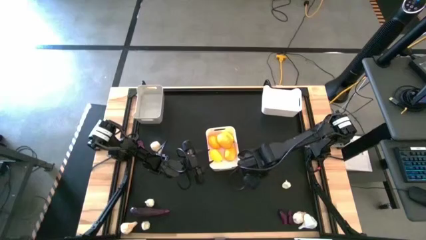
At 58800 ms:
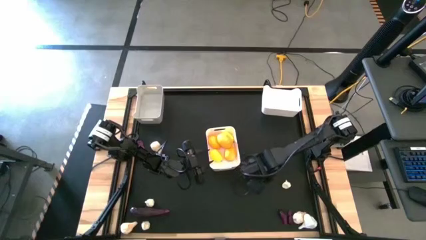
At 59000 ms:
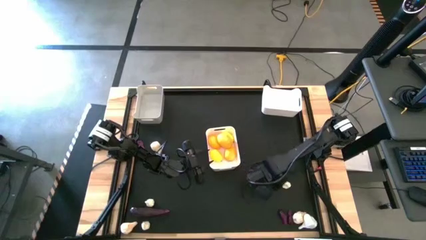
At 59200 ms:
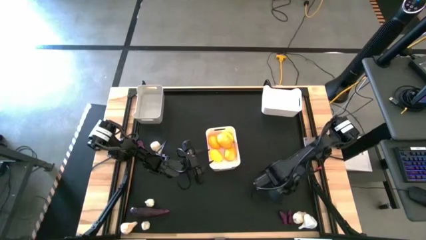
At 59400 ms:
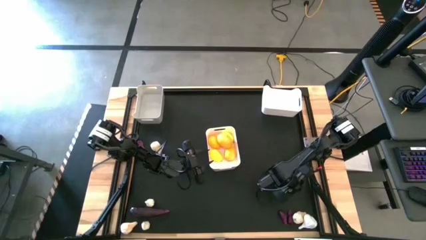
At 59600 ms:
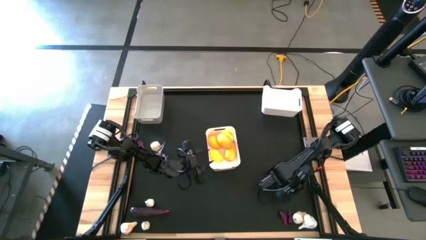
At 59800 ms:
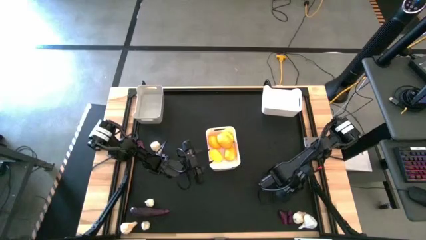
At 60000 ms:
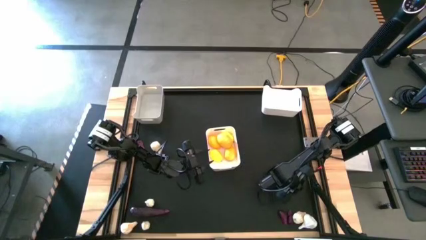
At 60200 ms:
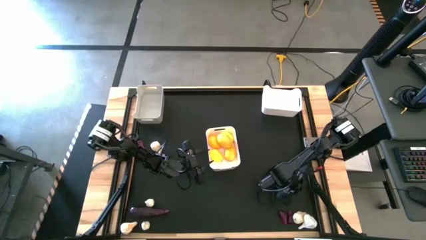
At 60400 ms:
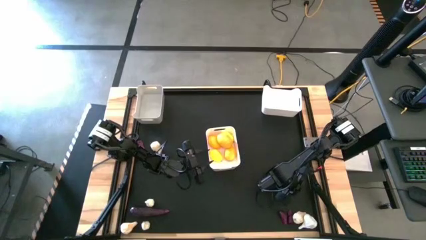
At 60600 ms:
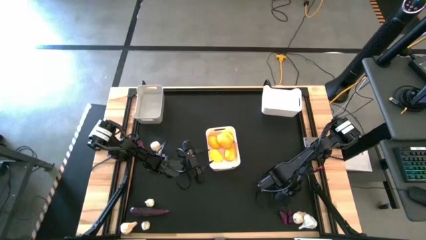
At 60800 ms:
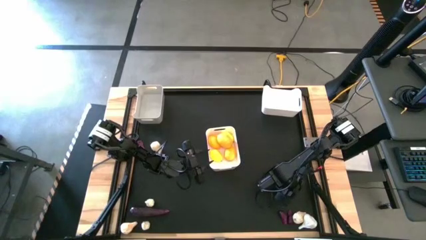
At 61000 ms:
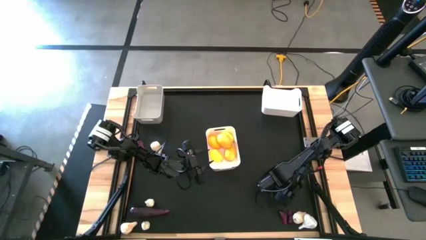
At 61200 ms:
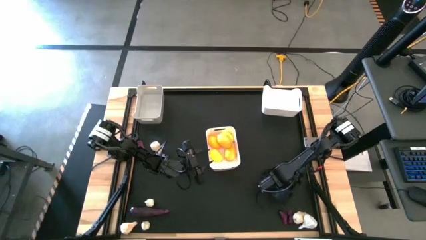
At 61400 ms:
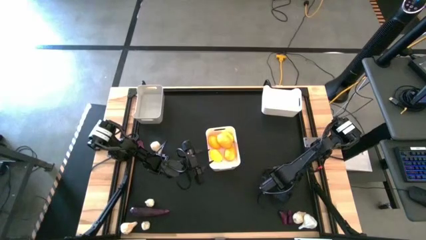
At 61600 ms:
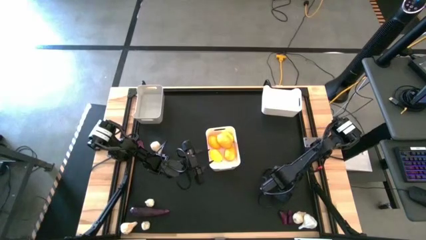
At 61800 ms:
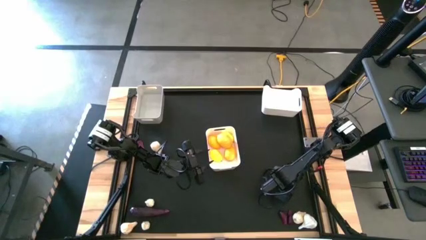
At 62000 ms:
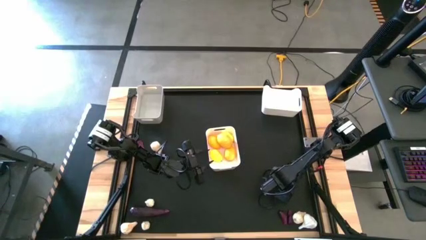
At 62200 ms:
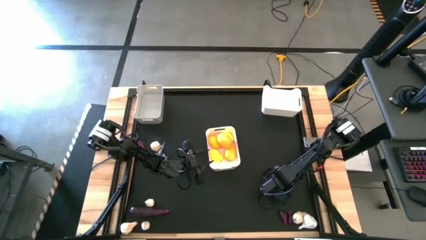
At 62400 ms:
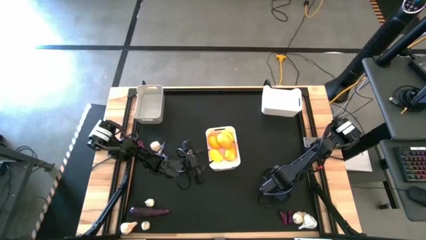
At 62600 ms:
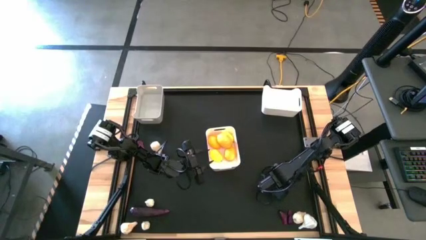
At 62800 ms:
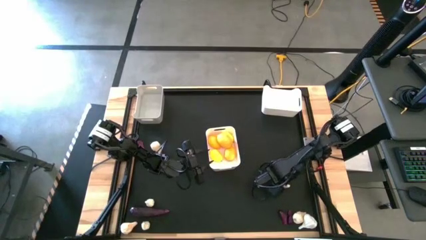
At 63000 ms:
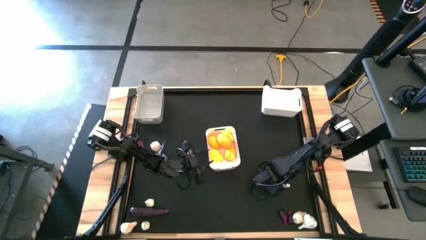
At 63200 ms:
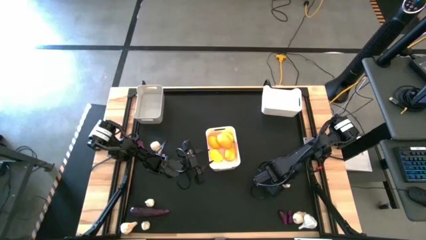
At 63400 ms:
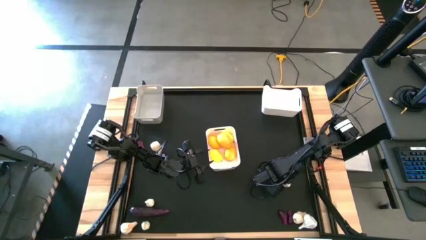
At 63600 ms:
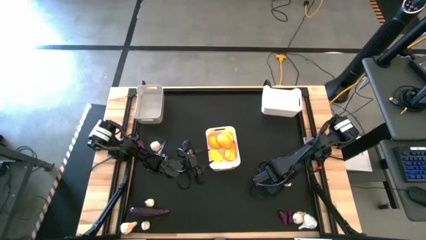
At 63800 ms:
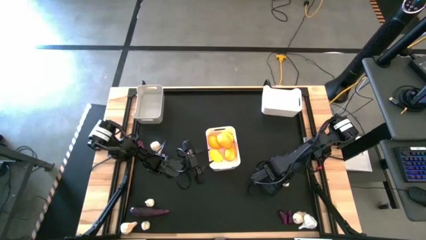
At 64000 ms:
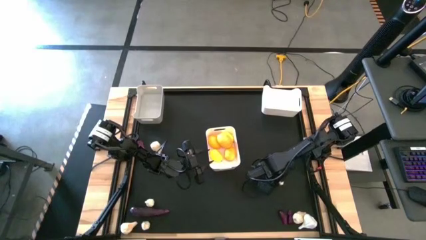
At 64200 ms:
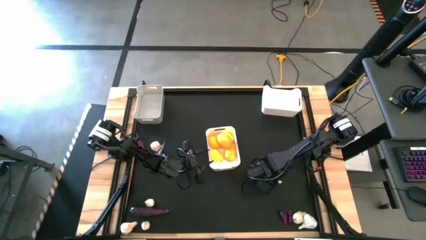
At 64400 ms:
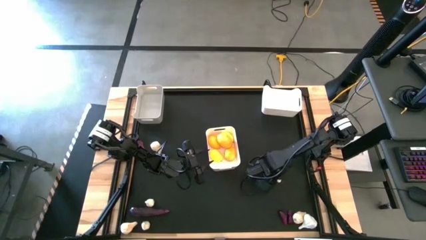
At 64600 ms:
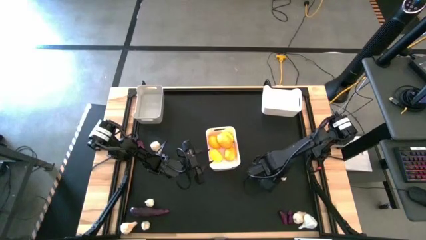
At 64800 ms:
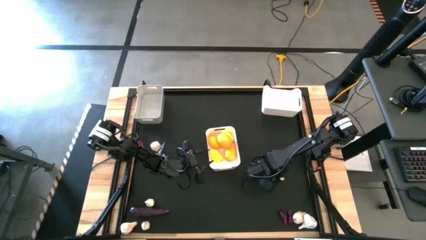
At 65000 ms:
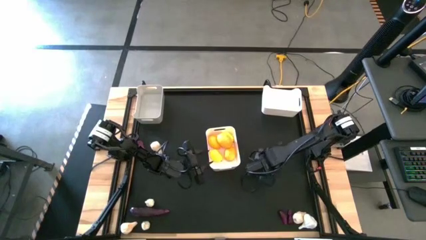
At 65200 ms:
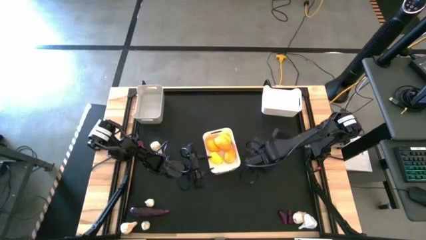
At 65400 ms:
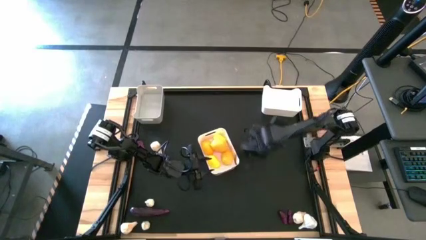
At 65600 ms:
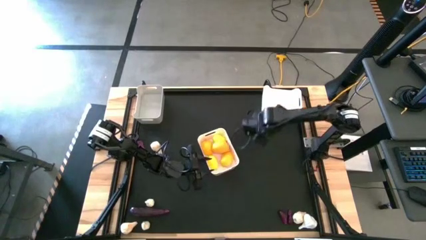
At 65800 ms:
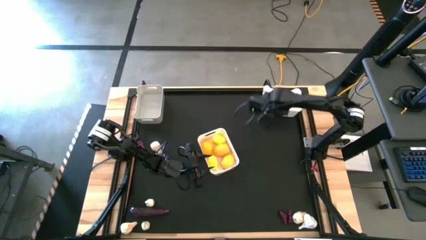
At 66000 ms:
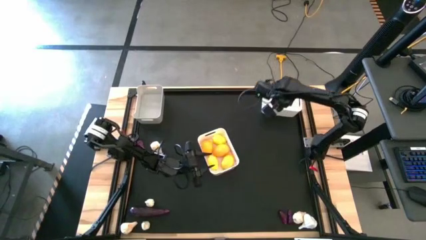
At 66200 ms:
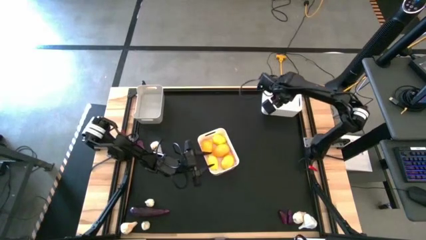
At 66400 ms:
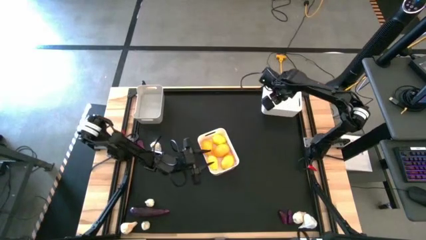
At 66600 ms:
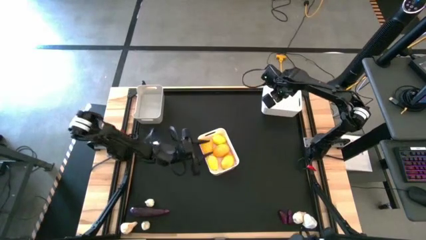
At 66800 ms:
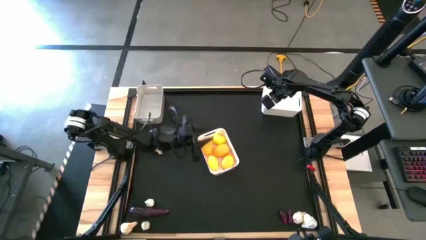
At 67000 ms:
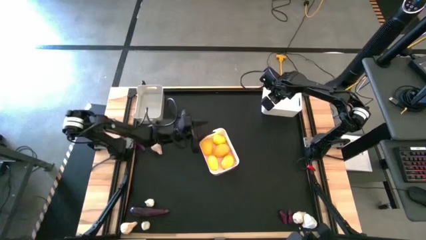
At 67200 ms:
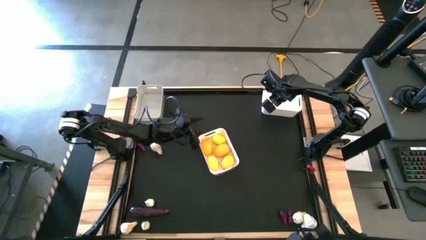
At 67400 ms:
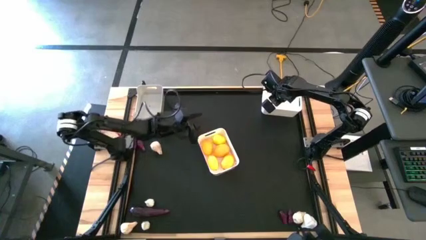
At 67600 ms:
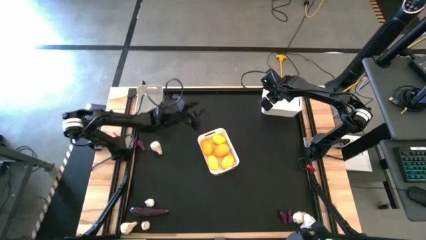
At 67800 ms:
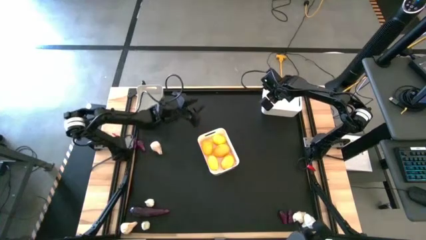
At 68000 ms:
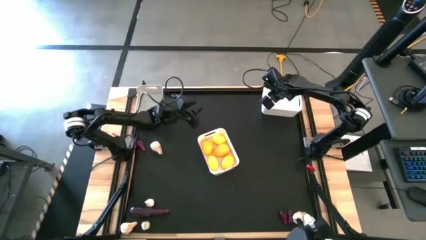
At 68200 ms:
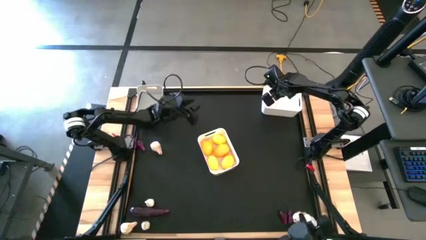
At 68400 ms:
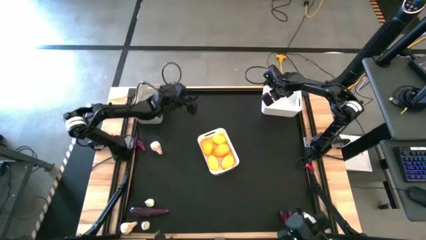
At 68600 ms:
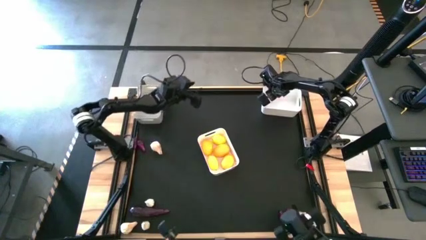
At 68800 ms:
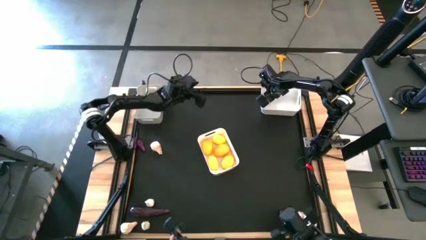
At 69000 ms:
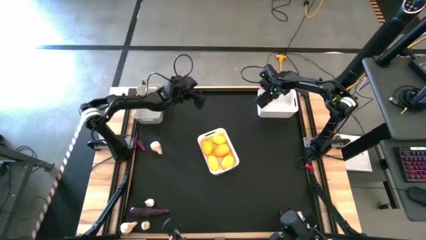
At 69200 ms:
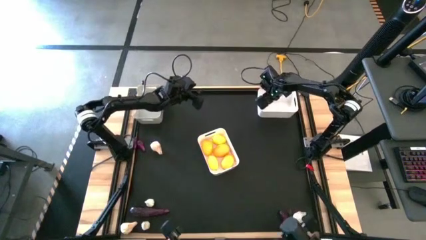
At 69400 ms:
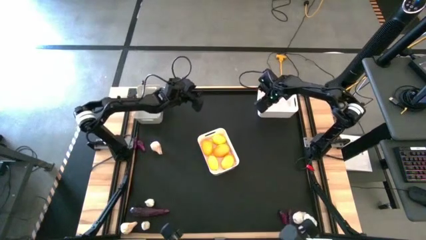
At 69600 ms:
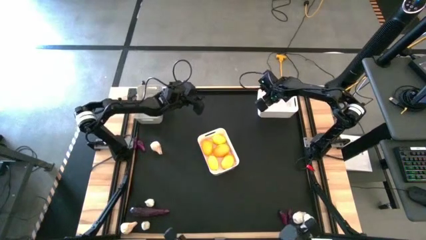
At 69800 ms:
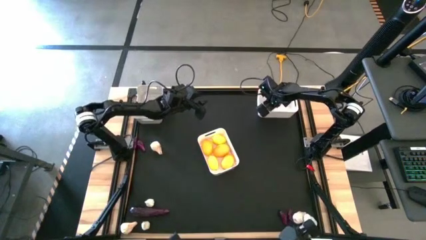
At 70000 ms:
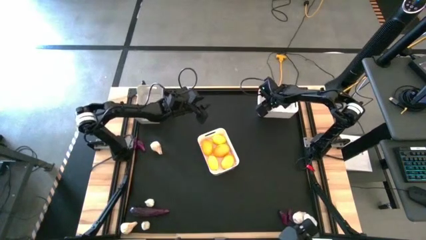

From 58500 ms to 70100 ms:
Task: Sort produce into baskets
Put the garlic into the top white bin

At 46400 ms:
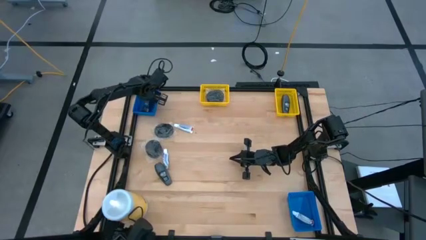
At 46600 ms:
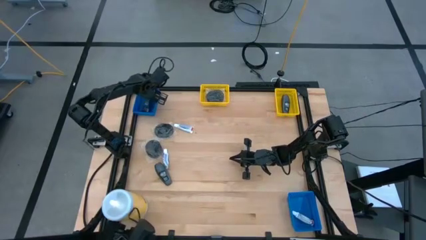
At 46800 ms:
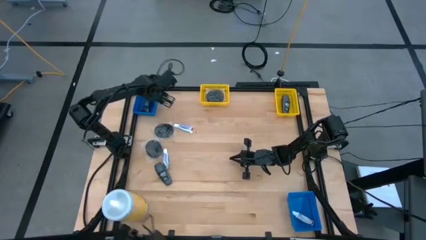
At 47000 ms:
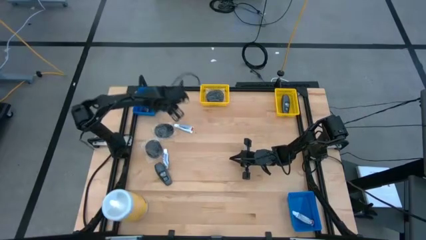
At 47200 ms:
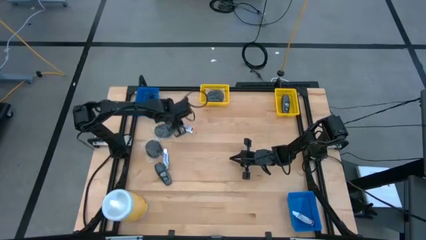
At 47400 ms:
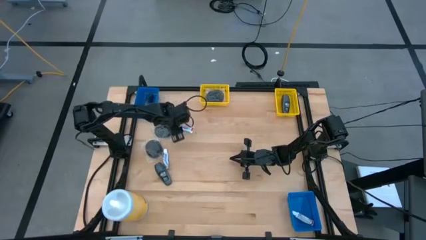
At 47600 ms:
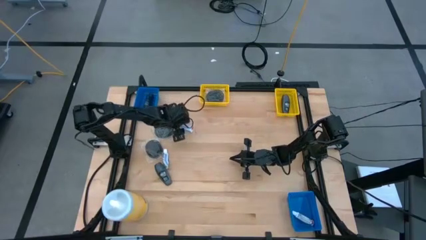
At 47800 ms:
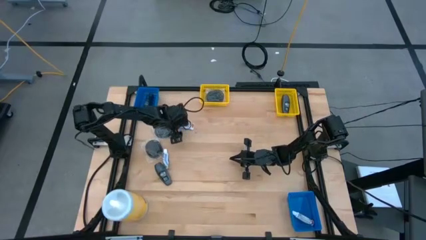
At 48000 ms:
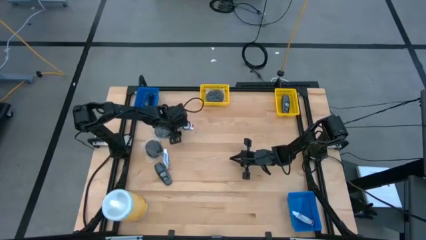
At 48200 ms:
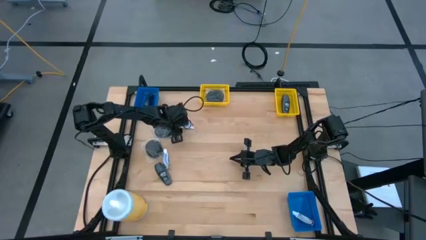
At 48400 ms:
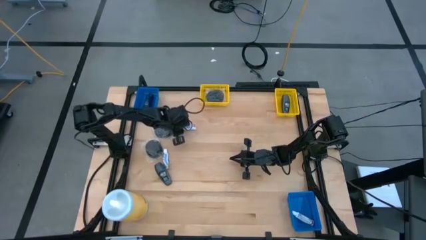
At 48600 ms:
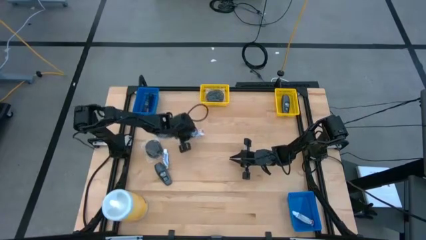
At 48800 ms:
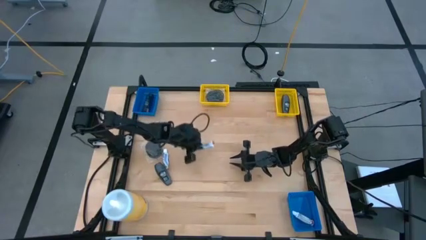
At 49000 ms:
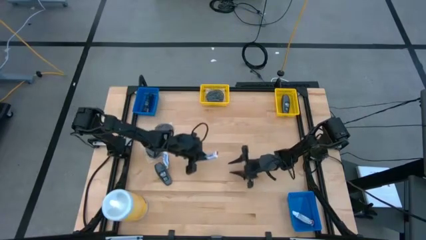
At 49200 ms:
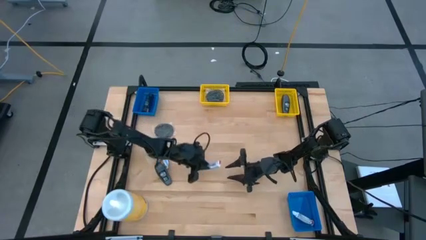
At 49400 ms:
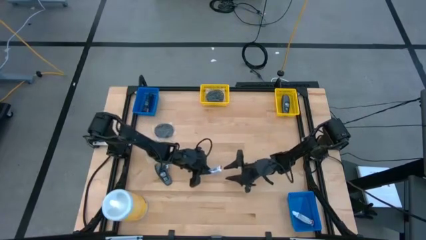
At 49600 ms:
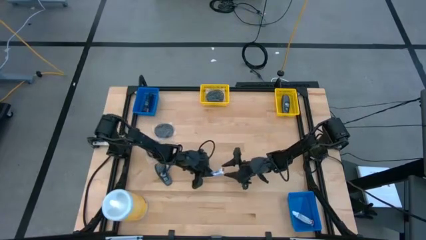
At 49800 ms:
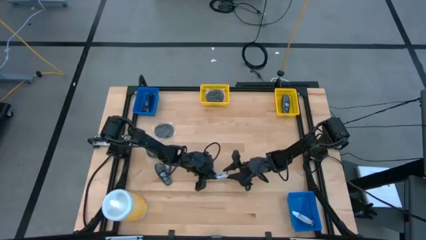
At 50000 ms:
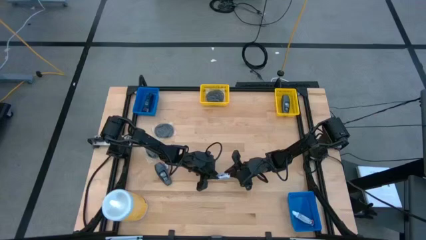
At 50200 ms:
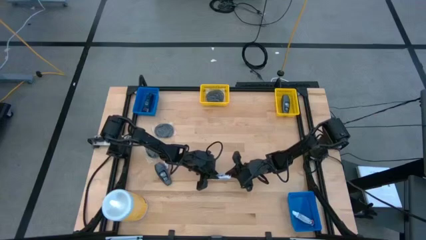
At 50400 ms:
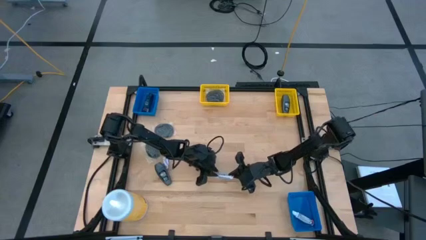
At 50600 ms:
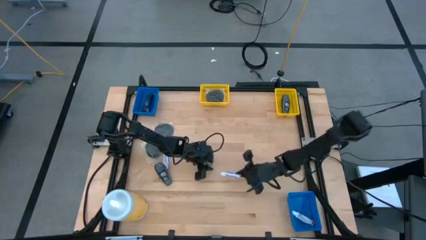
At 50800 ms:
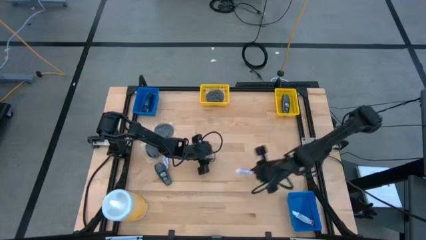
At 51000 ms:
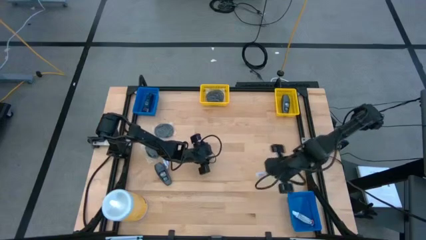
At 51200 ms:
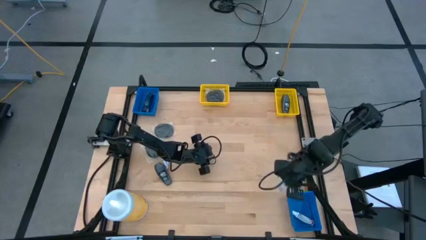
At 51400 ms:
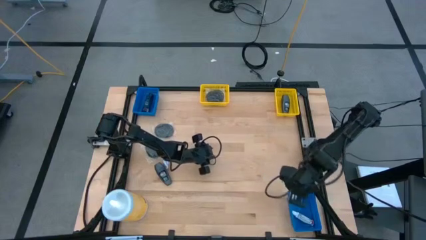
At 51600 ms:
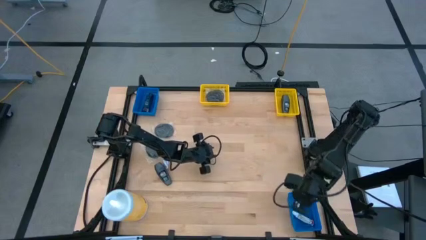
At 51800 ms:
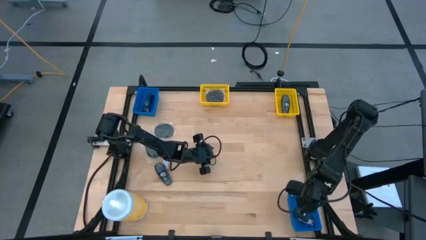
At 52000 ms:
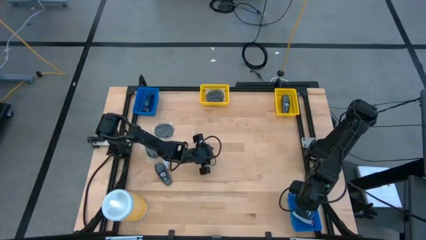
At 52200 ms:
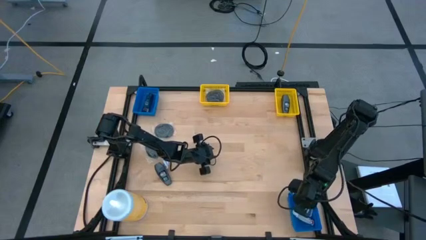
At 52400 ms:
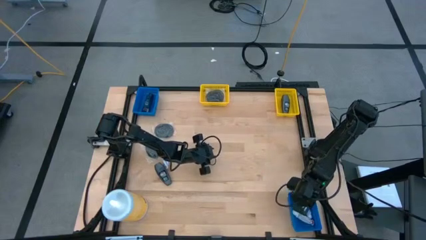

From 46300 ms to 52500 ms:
Task: Pick & Place Travel size toiletries
Put the top toothpaste into the bottom blue bin
